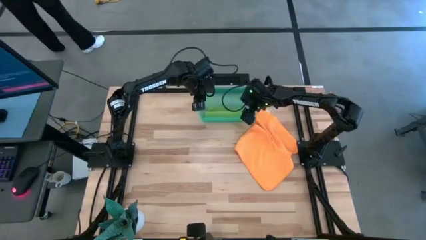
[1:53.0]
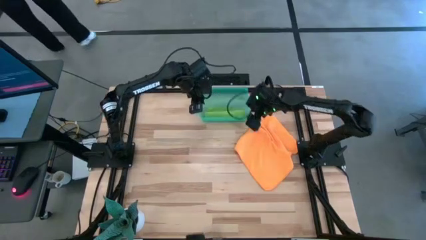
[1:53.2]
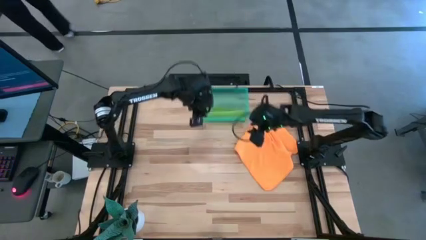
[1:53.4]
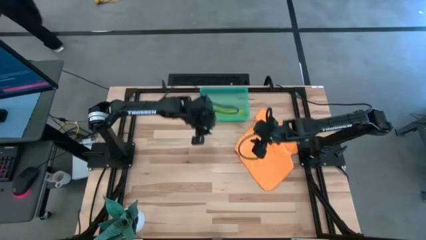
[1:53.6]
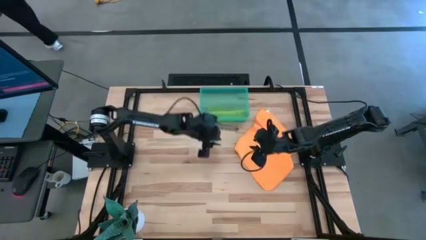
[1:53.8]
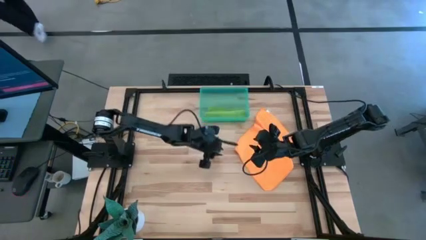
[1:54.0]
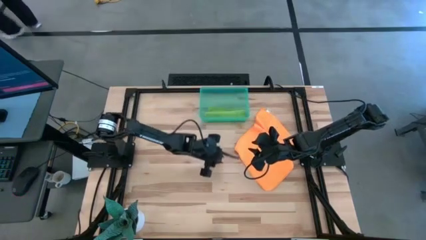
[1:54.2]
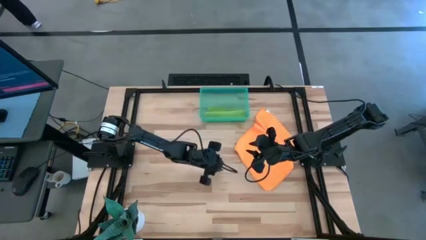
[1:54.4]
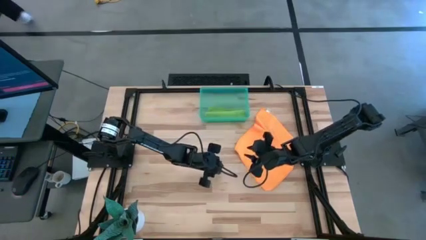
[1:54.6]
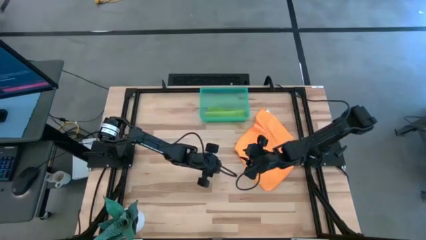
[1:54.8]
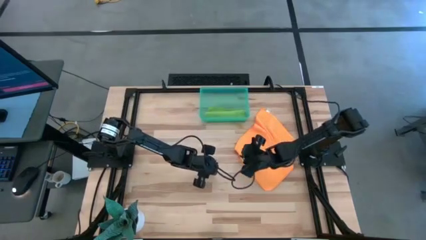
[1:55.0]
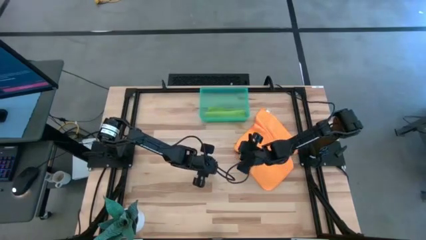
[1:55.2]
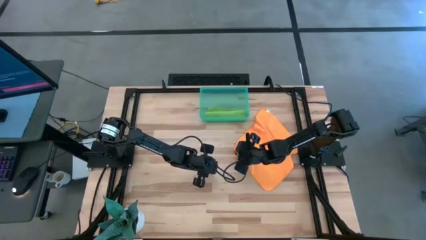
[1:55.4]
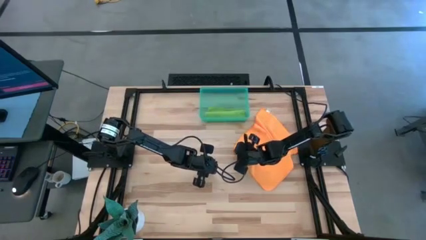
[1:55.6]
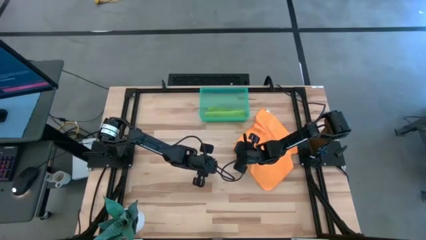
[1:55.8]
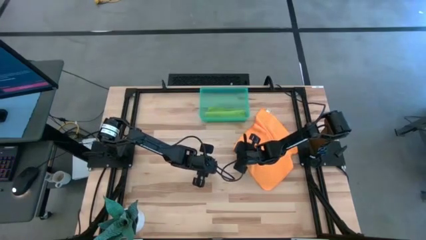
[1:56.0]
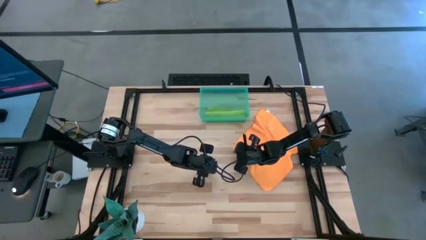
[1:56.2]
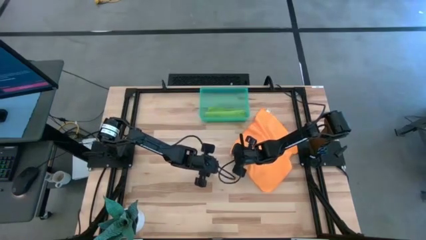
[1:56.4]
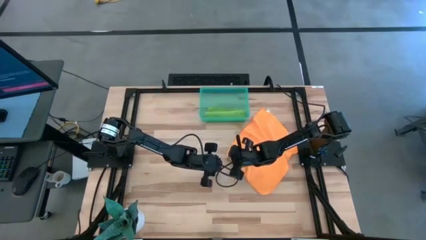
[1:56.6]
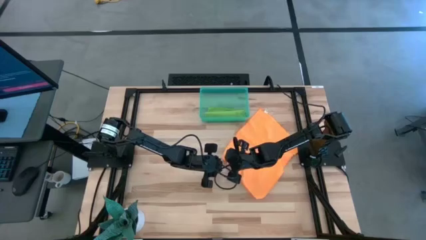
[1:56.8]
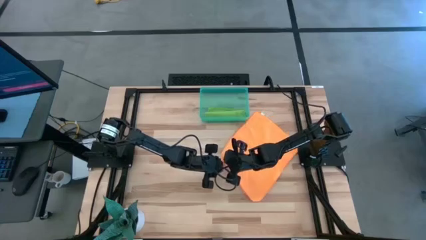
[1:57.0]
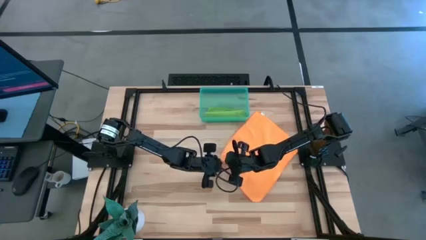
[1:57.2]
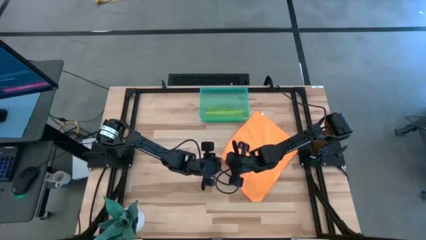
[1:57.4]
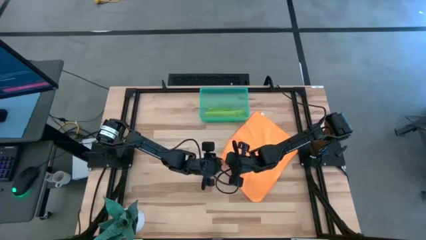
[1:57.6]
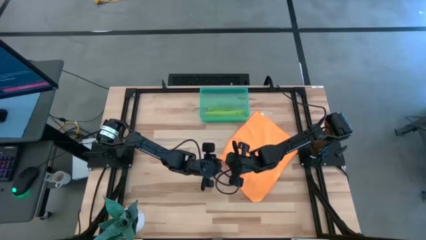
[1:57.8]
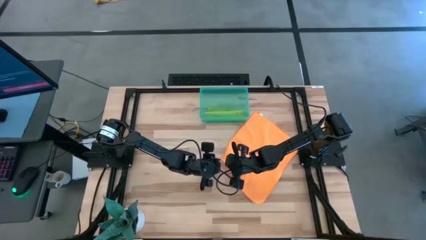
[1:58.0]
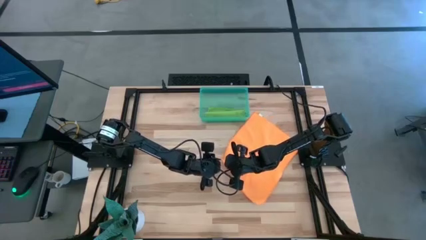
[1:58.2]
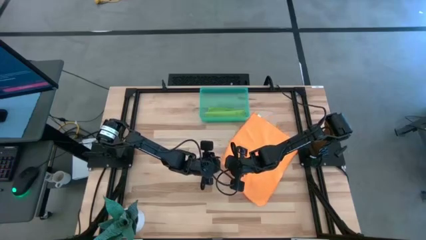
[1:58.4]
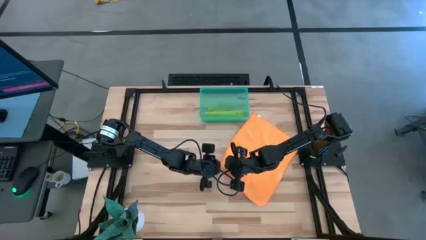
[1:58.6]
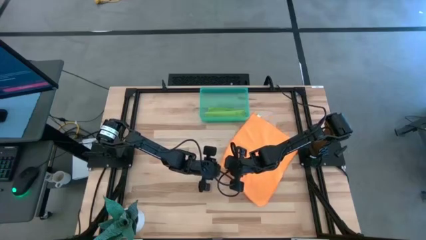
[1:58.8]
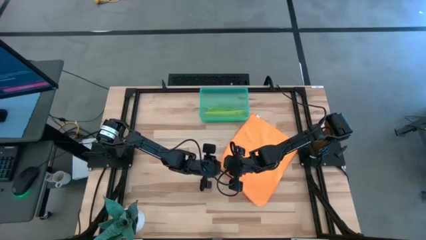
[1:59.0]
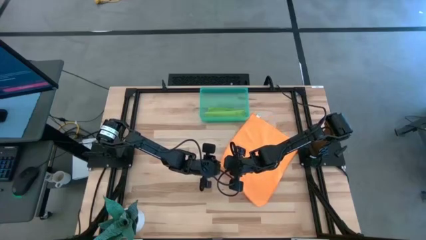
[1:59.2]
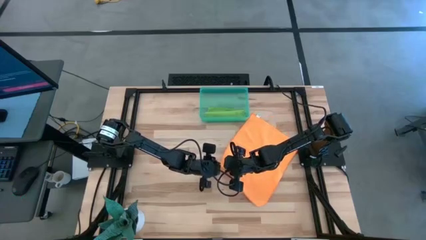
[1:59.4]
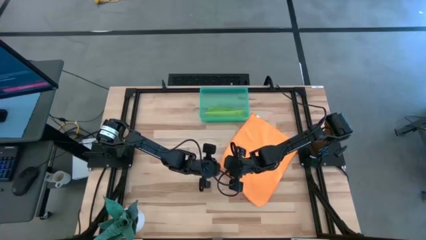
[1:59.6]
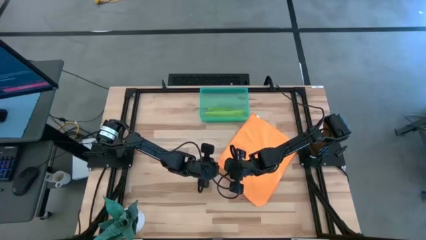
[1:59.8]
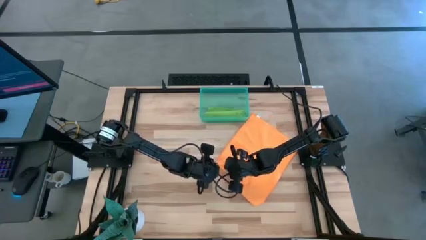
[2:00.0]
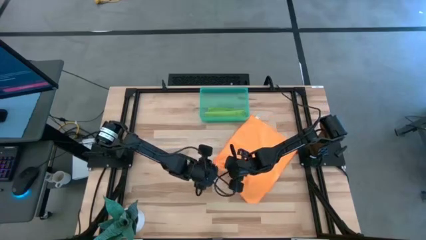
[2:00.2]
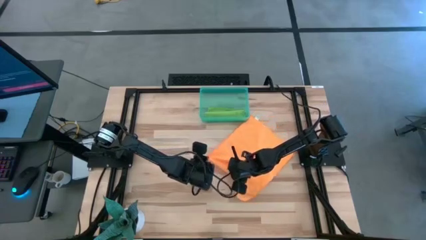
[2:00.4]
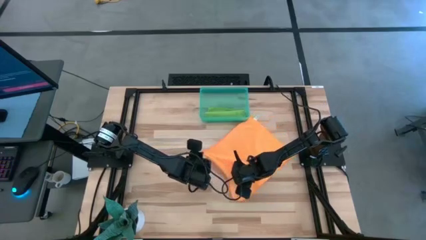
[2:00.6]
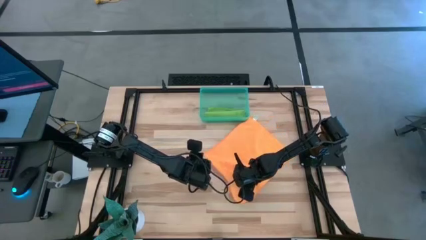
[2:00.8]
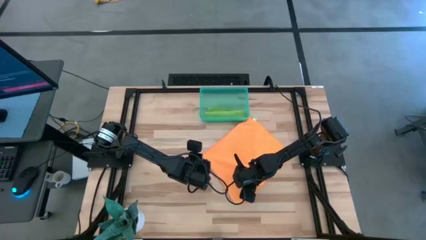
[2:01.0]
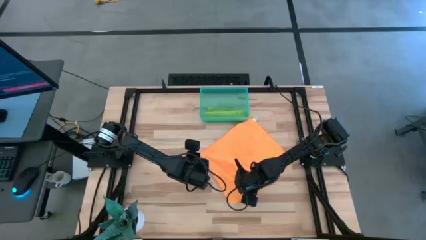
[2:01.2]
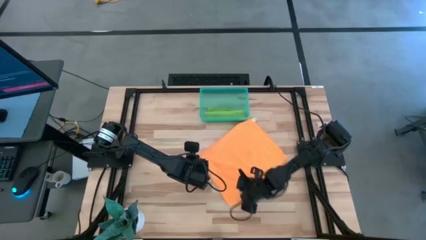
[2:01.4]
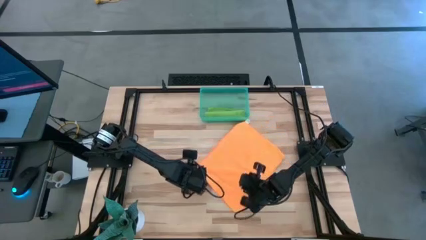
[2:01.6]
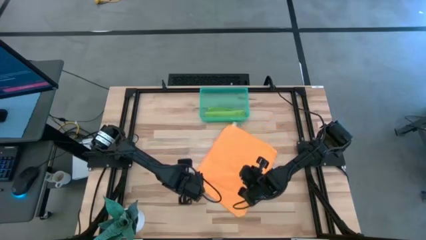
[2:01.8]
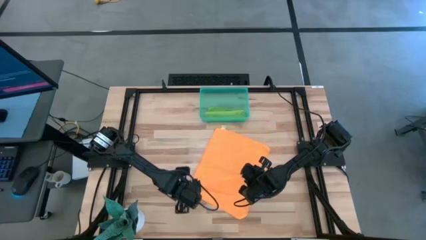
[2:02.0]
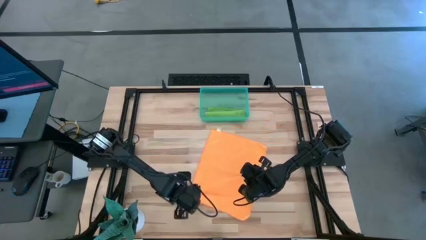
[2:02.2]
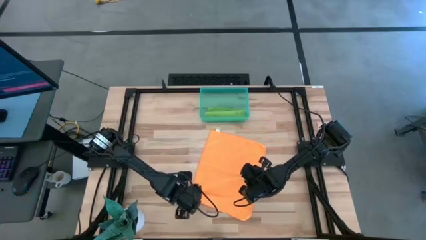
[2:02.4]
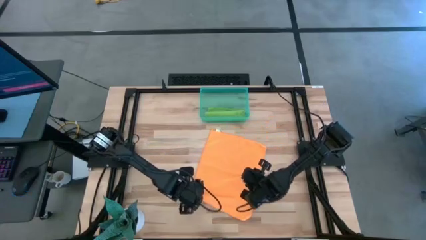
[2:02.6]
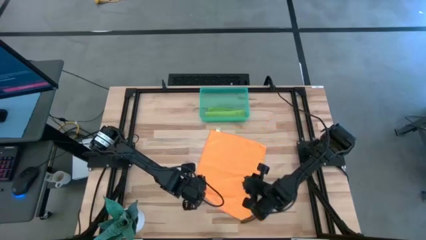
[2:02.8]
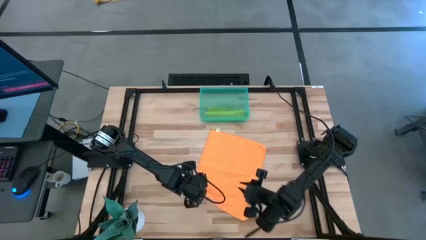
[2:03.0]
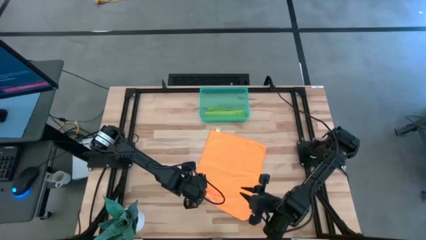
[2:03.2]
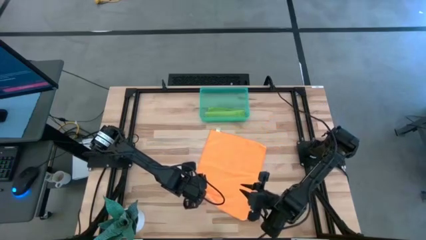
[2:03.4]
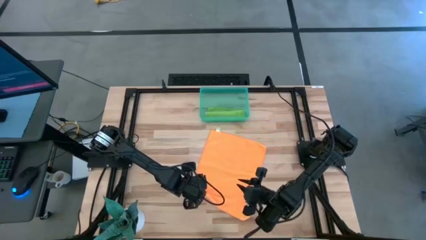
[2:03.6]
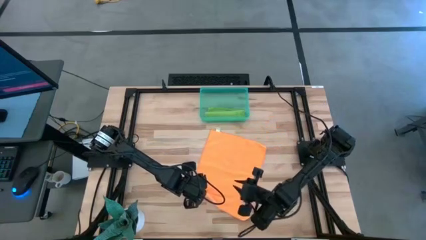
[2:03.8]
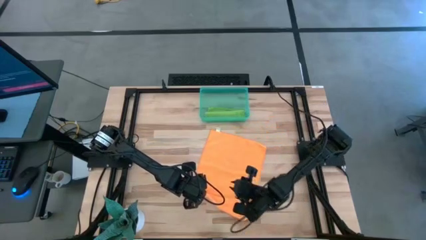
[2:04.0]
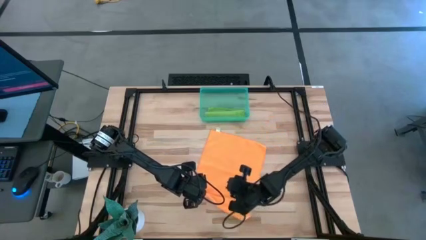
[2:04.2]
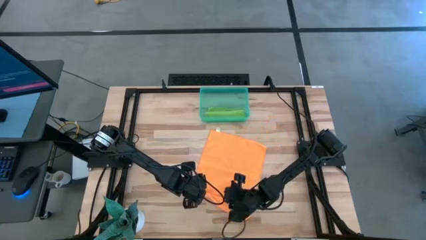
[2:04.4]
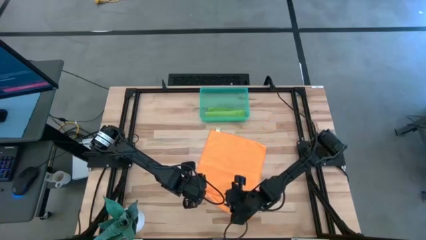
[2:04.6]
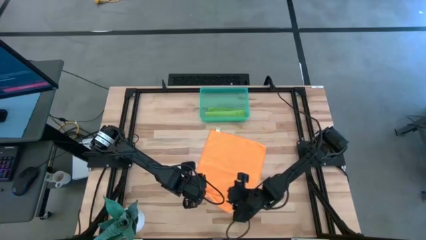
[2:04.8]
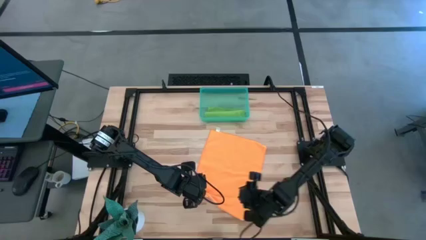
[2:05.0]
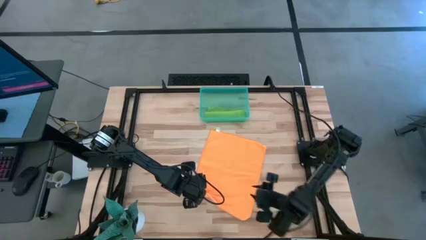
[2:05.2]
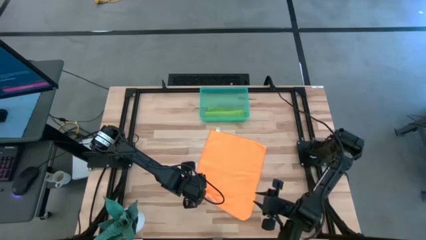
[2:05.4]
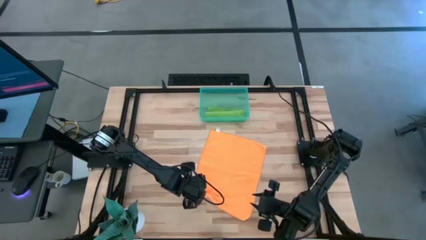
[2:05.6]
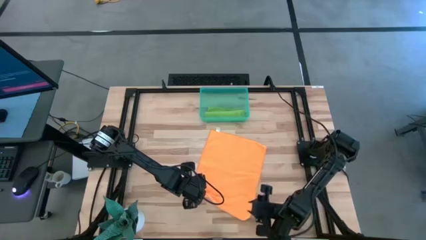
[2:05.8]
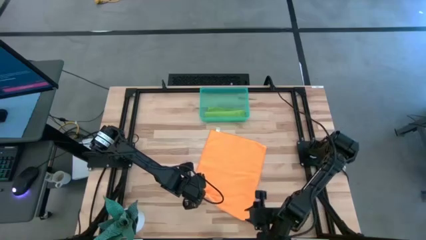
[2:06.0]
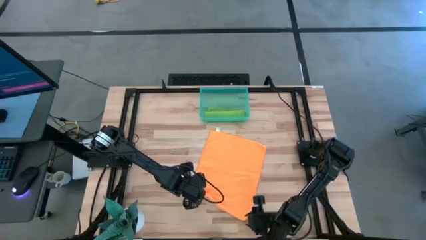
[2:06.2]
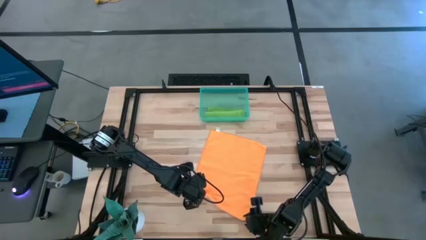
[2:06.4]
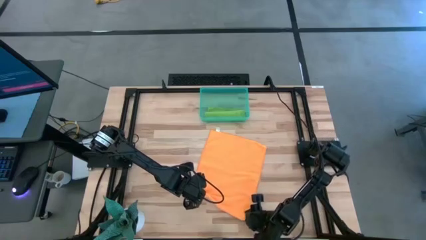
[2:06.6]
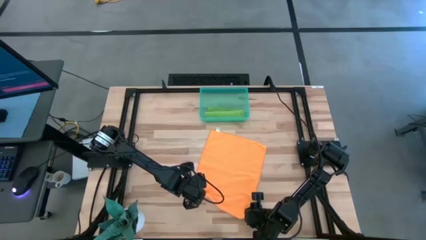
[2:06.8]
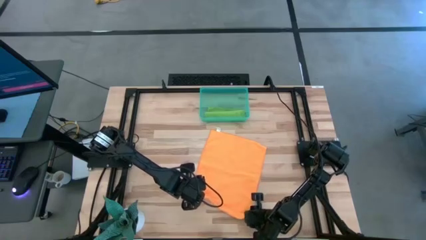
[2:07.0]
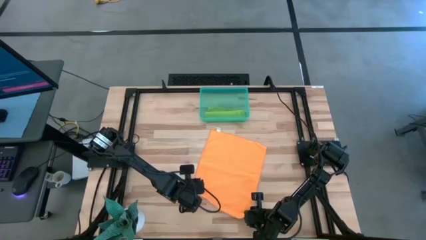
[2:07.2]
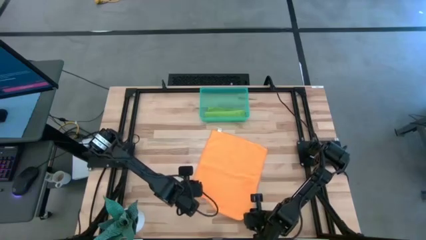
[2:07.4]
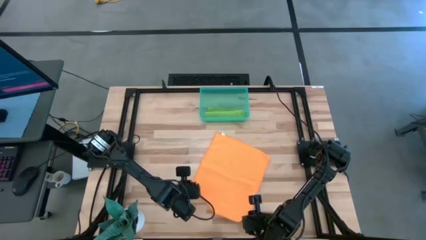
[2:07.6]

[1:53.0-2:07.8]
Task: Roll microfiber towels into tight, uniform cylinder then place into a basket
Fold the yellow microfiber towel

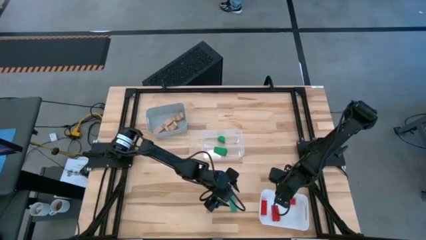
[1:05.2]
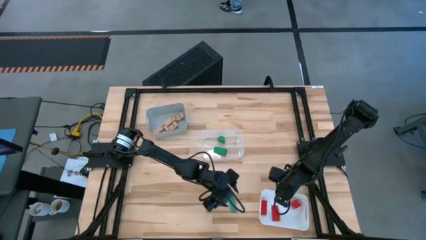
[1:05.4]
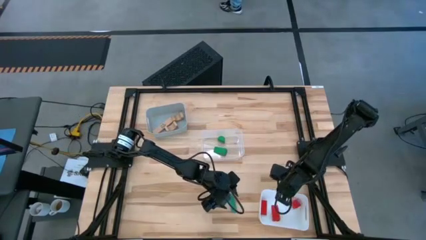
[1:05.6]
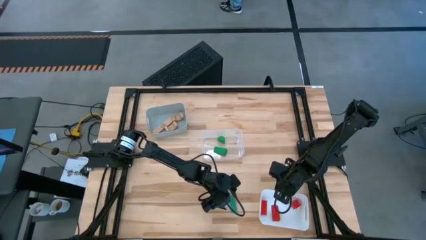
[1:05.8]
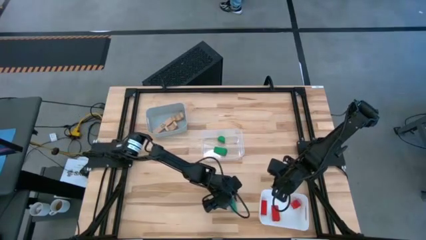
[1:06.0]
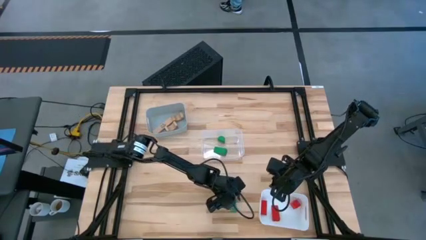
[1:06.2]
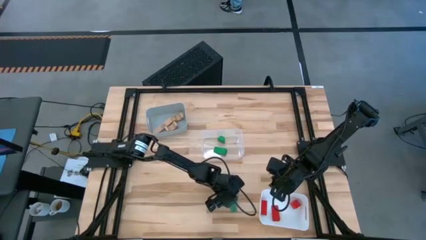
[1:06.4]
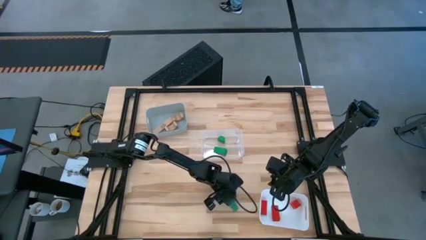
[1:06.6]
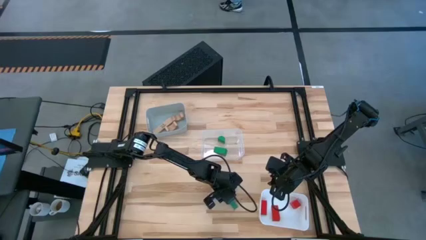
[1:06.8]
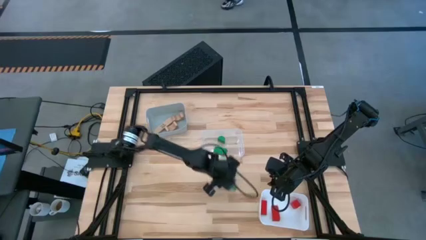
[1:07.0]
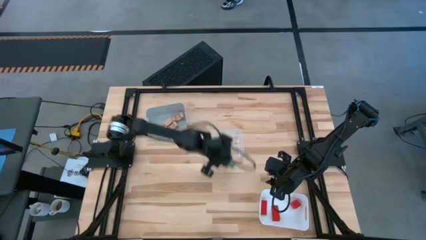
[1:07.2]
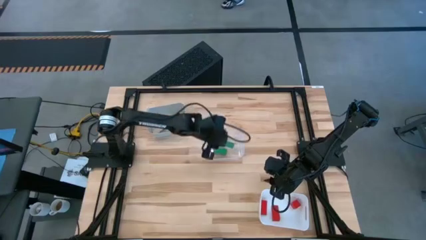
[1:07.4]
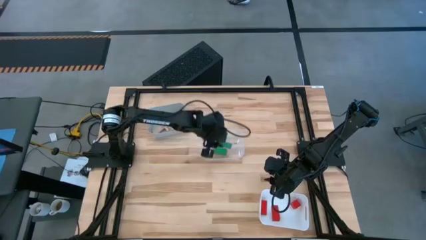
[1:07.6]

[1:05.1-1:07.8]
Task: Sort & place blocks by color
Put the green block into the transparent bin
